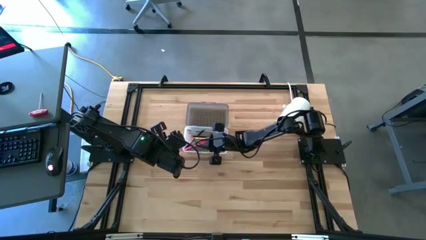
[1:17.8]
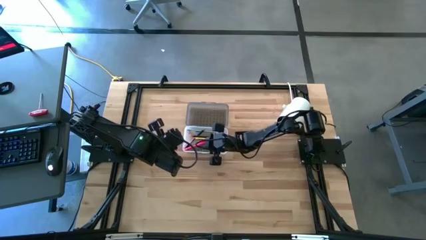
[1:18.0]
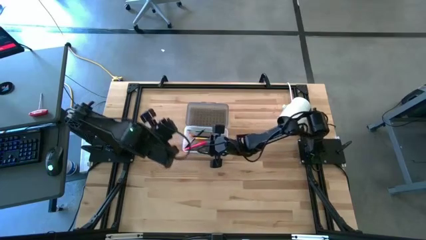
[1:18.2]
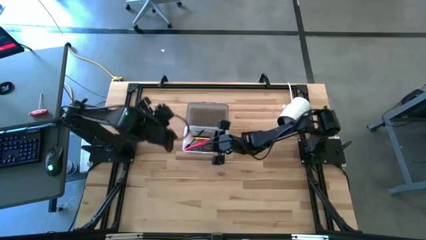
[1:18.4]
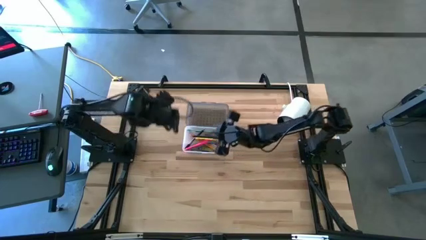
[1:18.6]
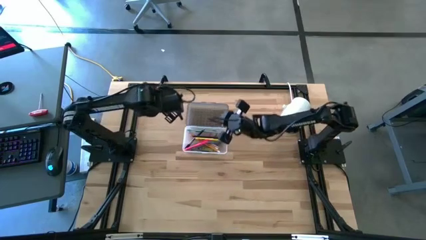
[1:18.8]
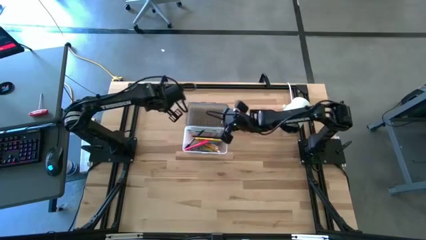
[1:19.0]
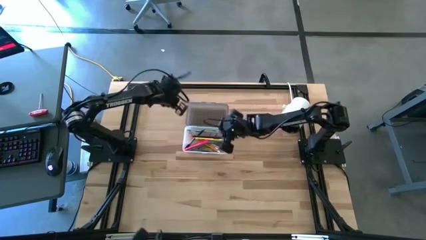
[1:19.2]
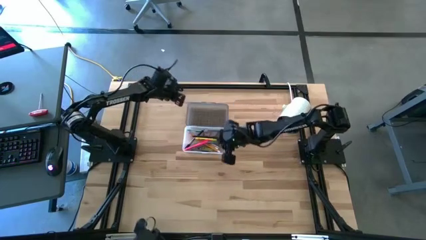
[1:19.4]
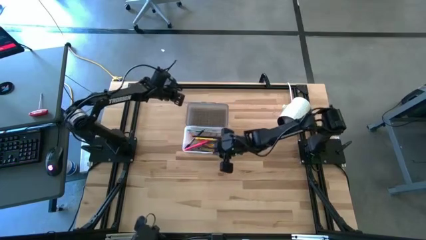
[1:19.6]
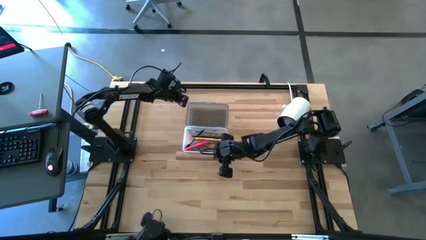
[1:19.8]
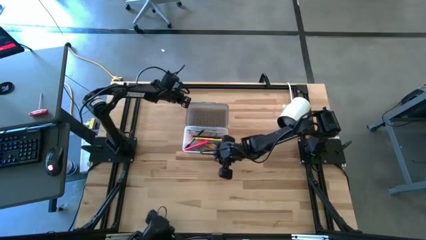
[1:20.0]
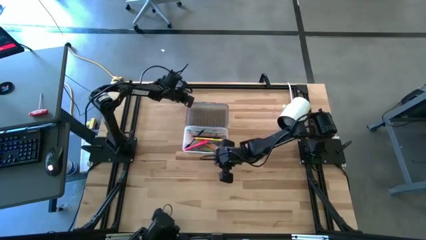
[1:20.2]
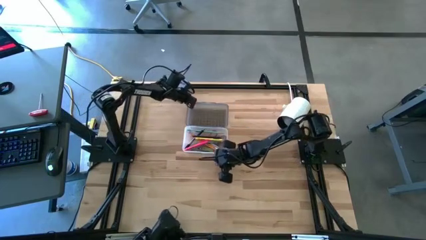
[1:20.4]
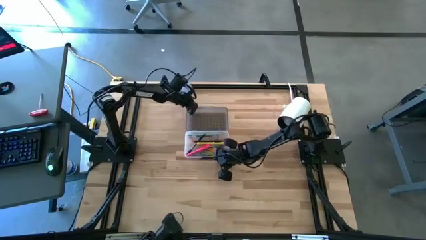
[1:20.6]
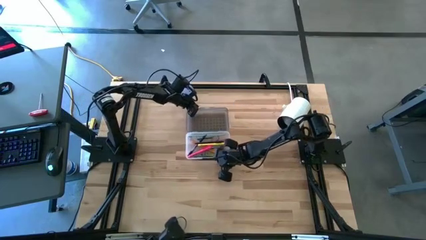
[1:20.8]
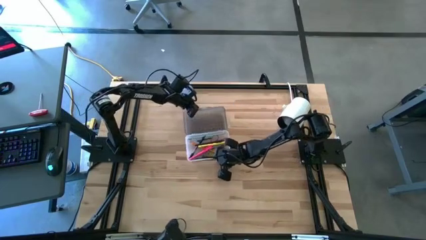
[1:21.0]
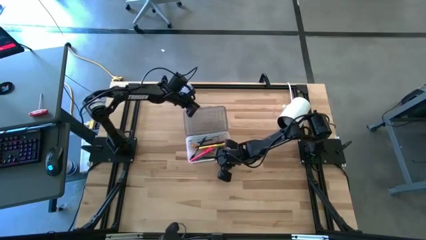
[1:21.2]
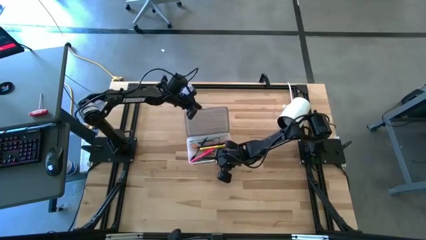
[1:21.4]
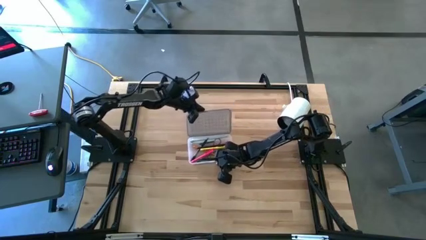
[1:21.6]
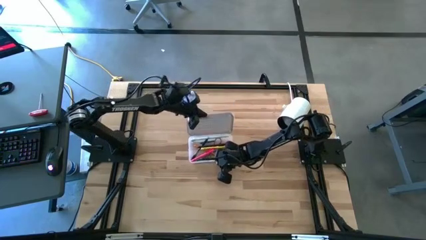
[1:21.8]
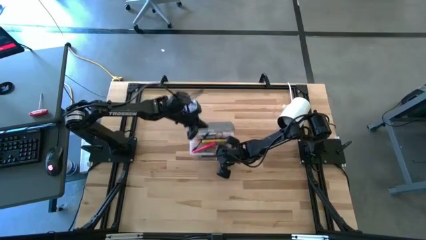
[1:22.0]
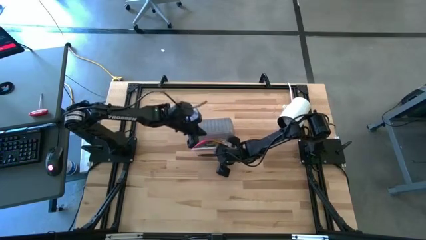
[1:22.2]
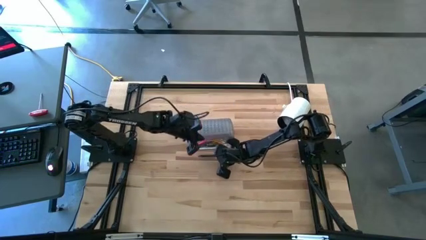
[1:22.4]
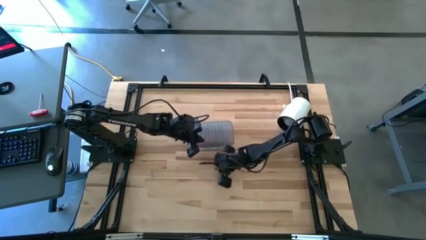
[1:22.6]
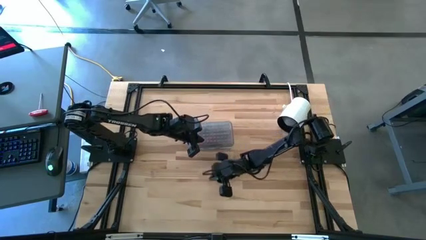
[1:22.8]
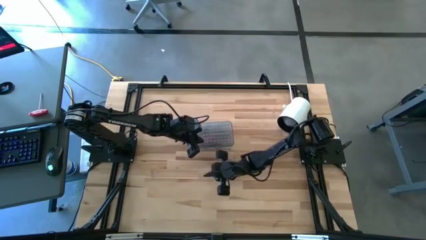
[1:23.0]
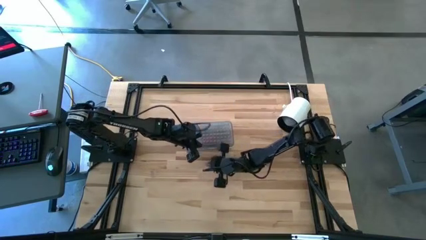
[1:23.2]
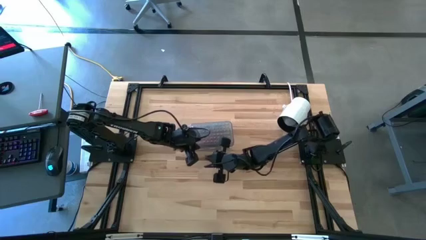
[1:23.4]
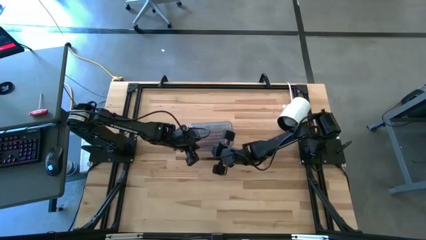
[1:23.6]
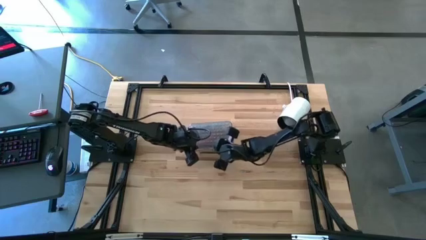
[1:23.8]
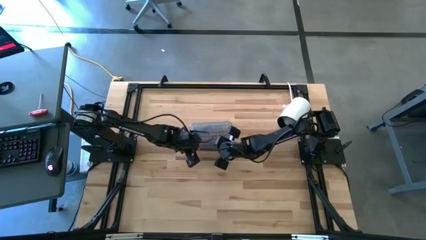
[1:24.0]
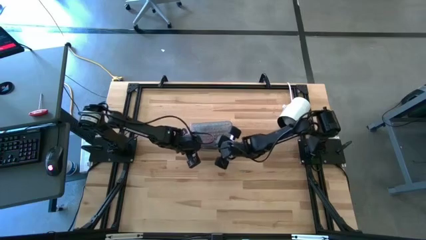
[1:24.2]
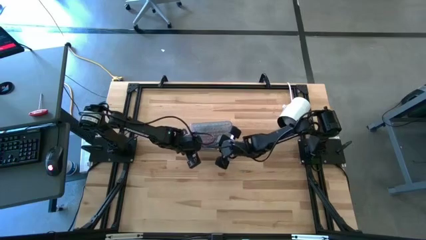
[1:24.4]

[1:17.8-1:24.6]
Task: Pick & place school supplies into a supply box
Close the black box

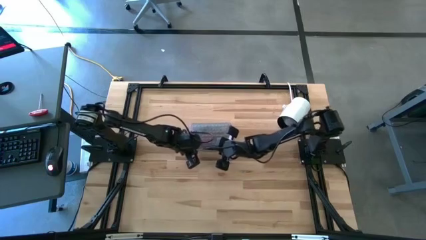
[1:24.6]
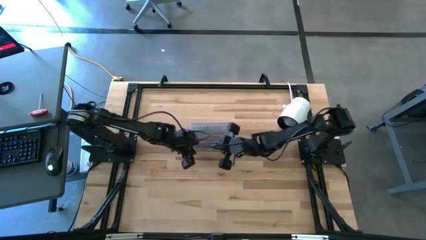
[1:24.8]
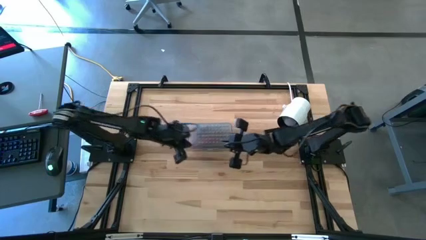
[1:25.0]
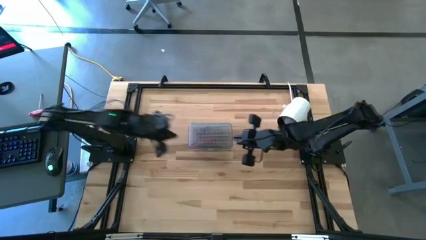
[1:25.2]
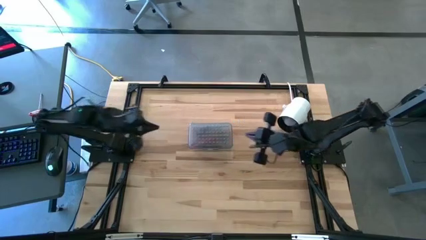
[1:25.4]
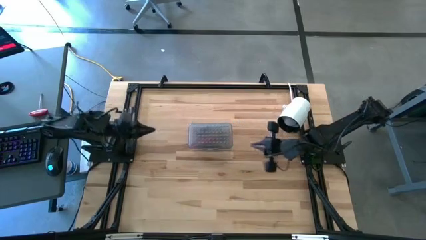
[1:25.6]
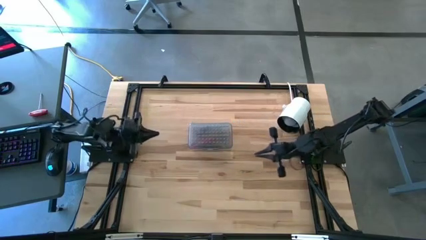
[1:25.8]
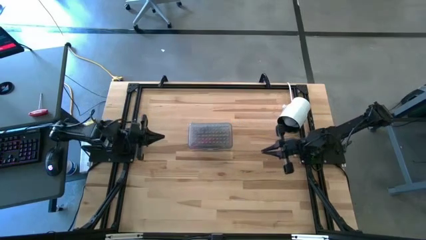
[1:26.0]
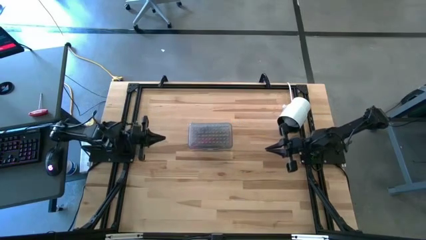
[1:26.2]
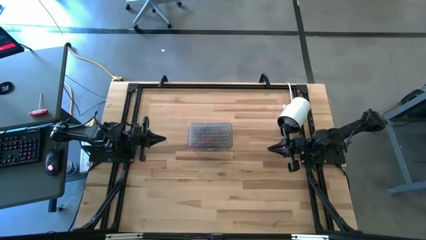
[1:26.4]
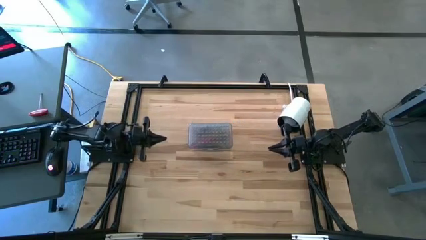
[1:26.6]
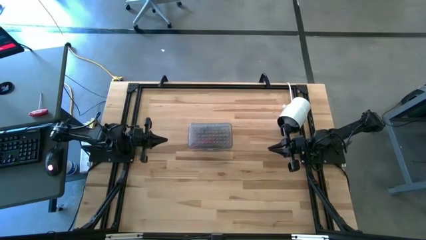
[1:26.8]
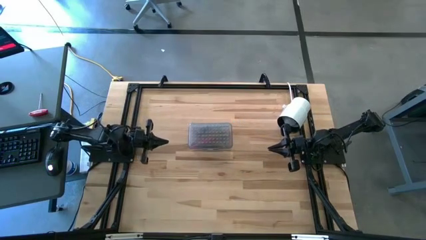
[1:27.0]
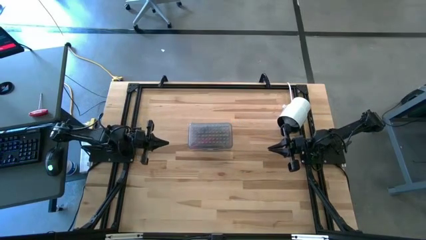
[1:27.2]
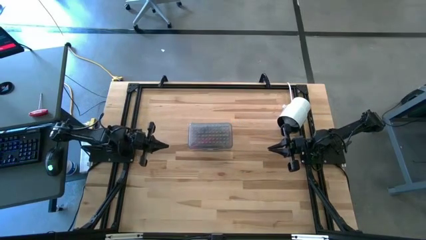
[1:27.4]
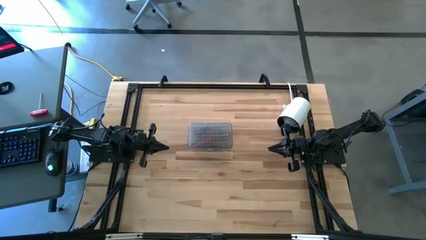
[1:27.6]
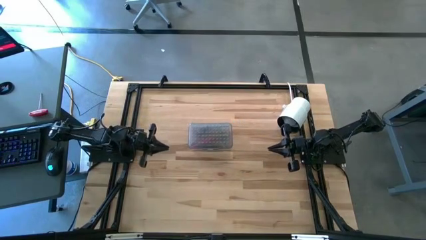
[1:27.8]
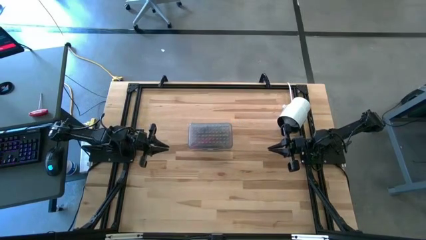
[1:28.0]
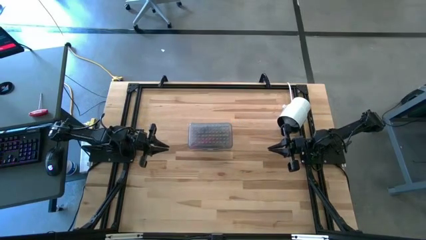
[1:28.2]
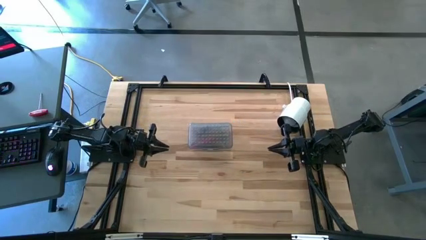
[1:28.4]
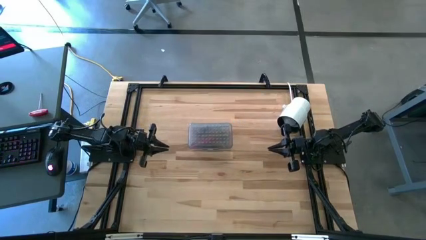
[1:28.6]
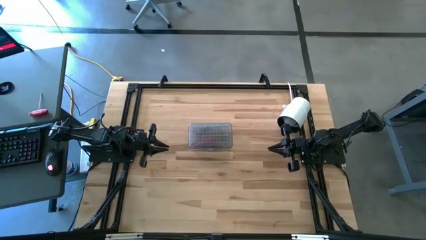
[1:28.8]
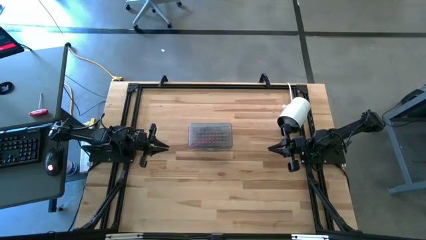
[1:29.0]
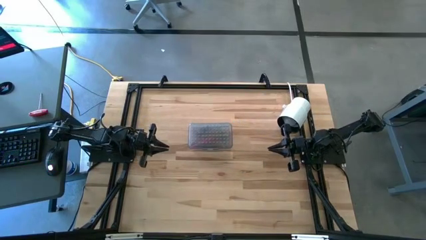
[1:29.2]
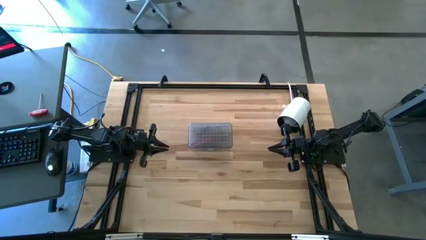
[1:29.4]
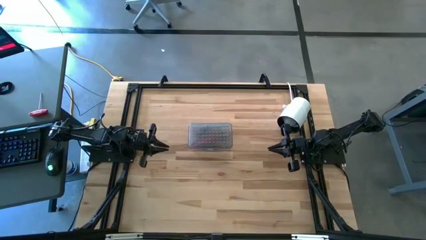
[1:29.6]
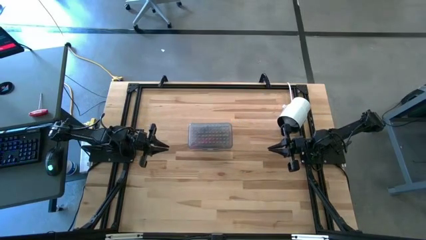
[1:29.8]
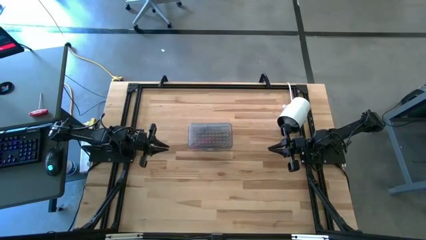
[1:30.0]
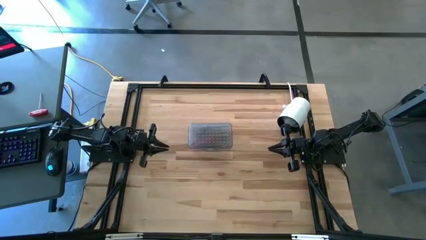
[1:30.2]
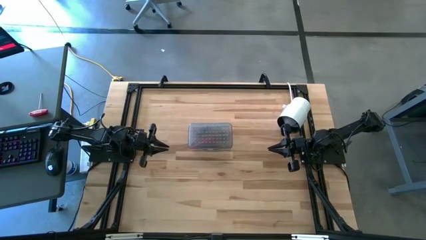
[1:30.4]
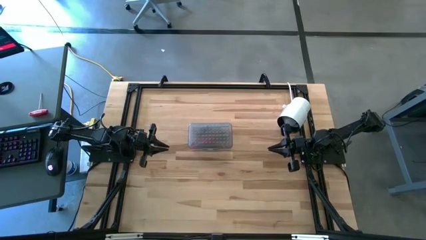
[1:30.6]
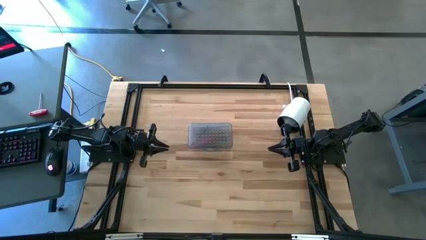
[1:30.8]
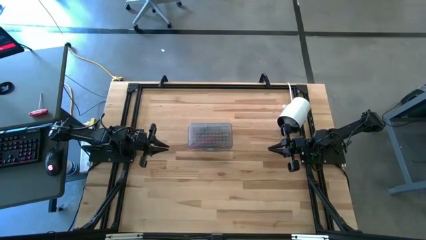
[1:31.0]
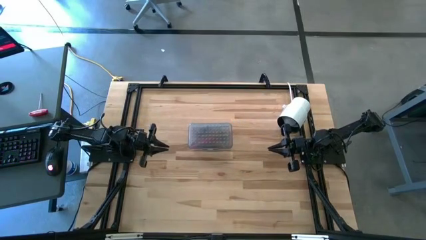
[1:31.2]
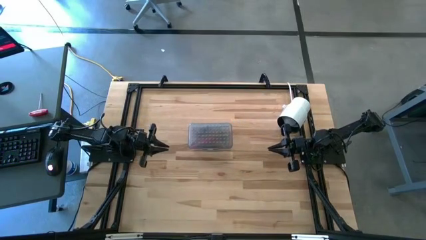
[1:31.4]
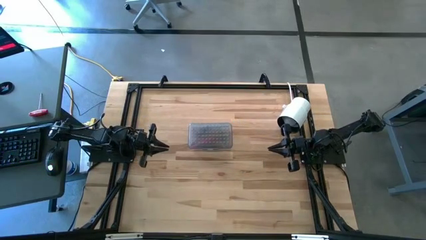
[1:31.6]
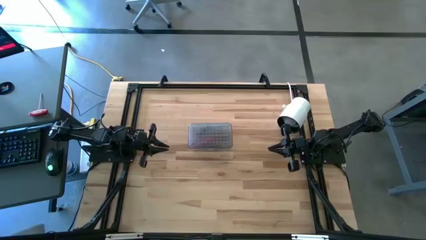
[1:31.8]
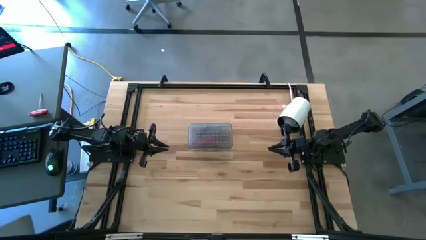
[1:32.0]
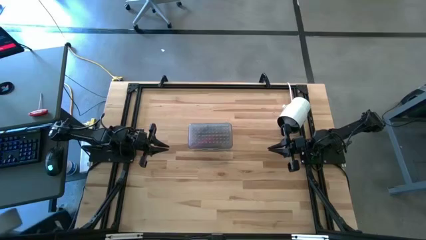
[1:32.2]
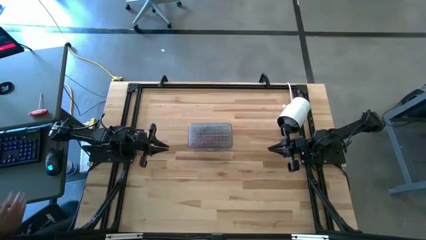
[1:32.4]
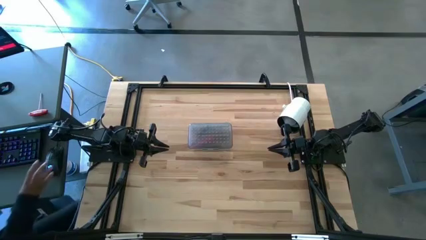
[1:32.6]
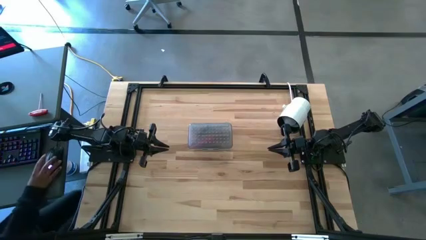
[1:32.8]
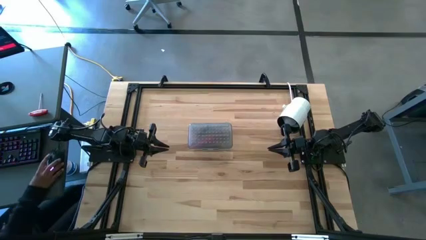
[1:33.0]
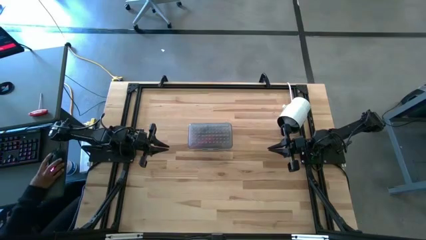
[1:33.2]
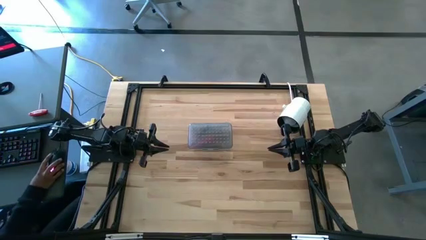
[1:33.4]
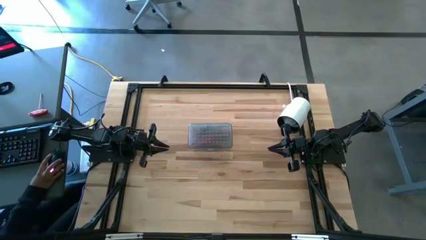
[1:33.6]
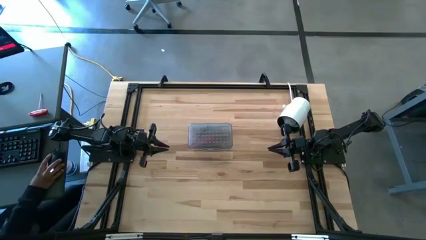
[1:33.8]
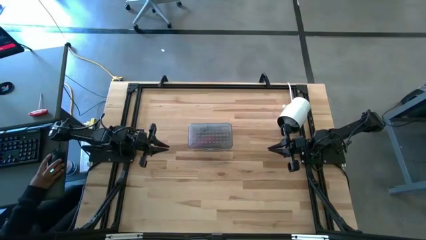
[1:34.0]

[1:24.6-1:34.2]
Return to Home Position
